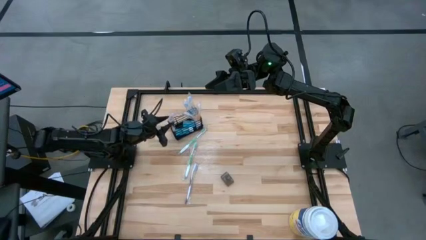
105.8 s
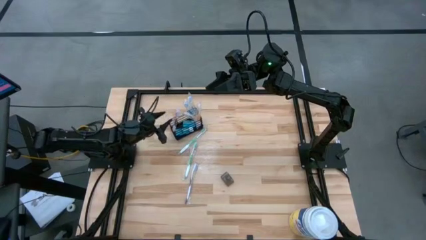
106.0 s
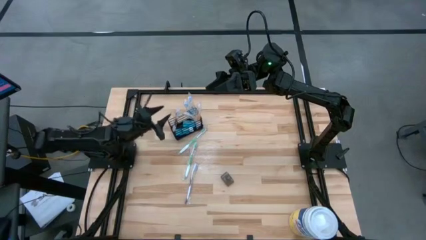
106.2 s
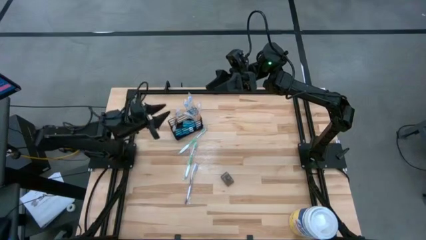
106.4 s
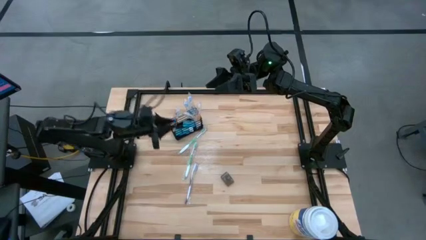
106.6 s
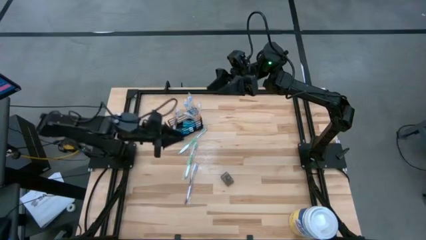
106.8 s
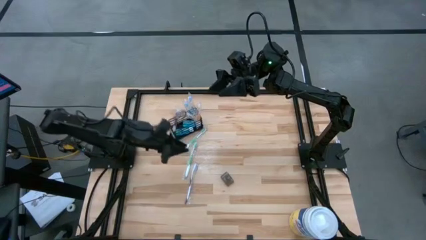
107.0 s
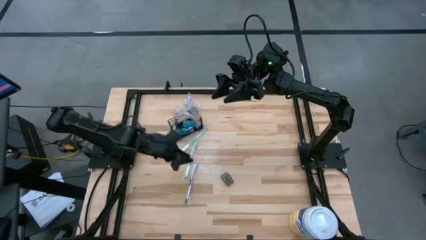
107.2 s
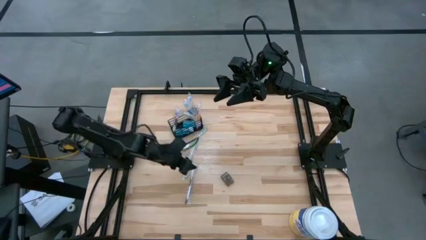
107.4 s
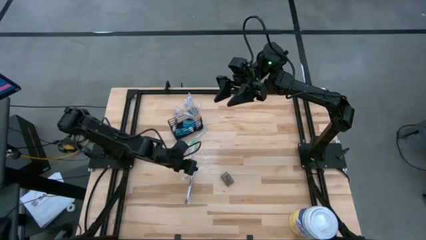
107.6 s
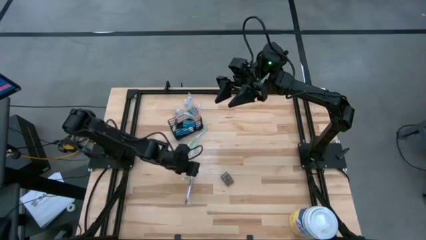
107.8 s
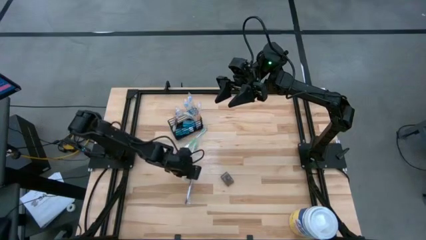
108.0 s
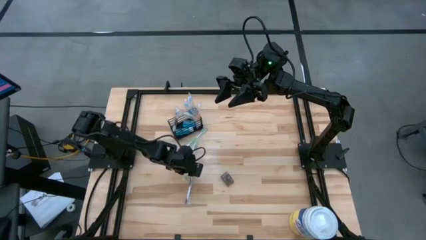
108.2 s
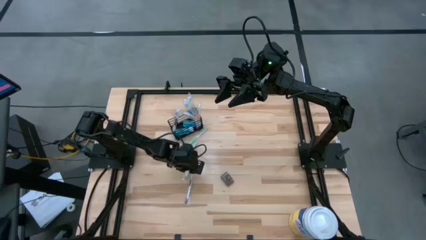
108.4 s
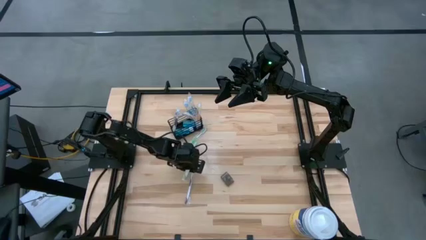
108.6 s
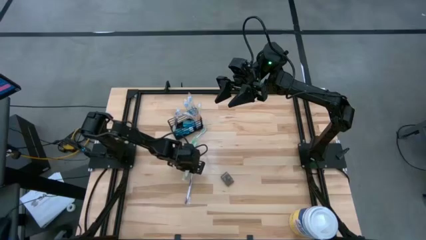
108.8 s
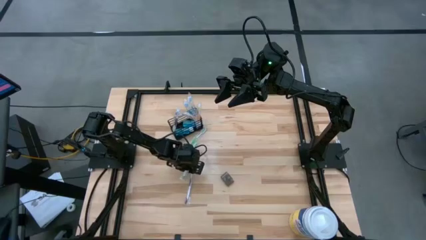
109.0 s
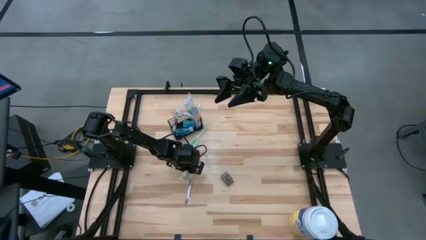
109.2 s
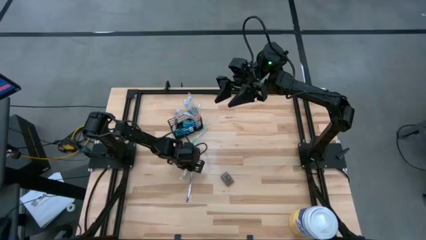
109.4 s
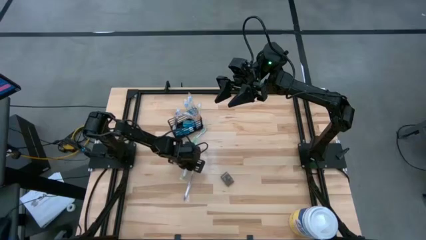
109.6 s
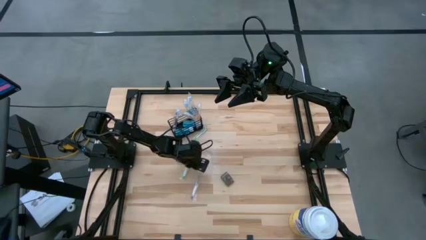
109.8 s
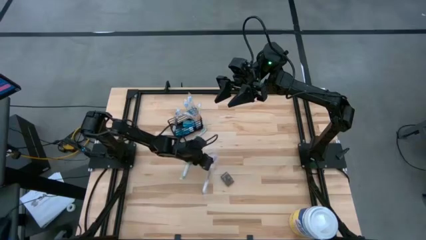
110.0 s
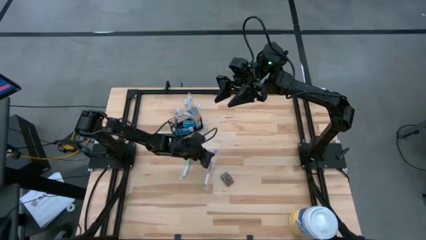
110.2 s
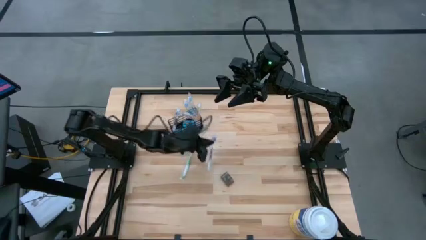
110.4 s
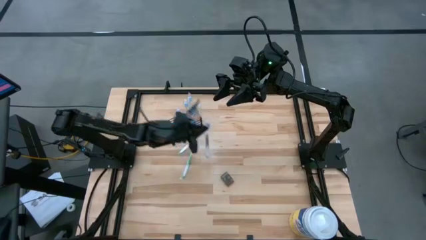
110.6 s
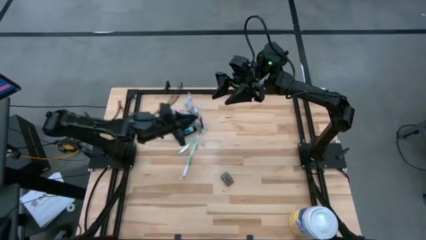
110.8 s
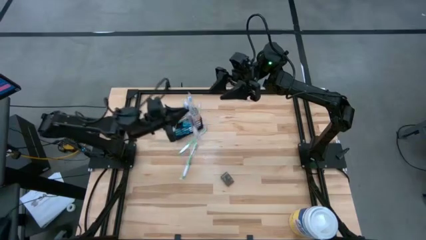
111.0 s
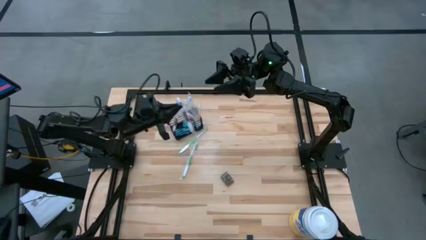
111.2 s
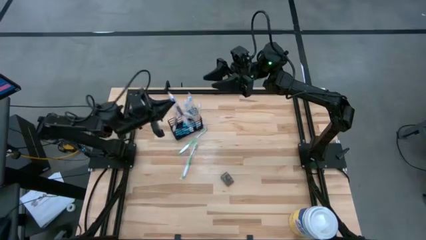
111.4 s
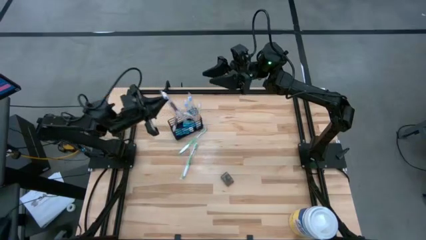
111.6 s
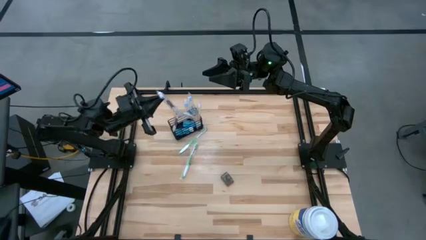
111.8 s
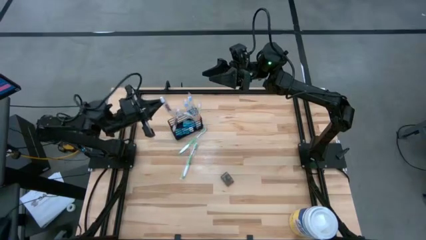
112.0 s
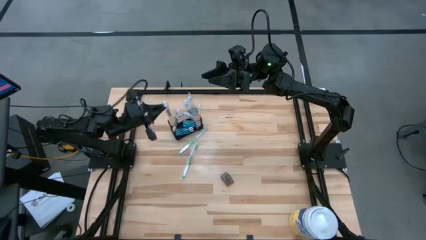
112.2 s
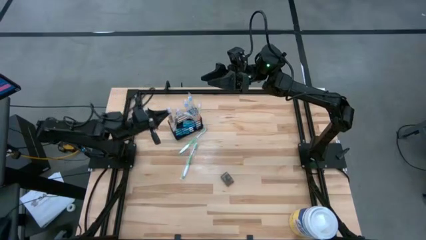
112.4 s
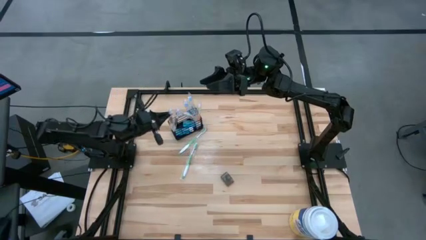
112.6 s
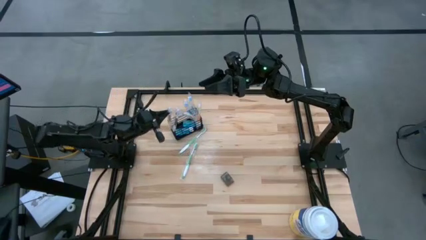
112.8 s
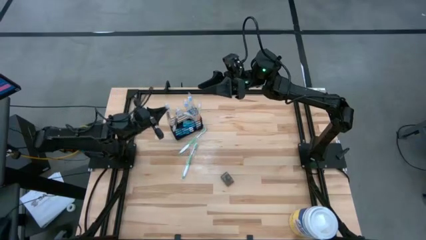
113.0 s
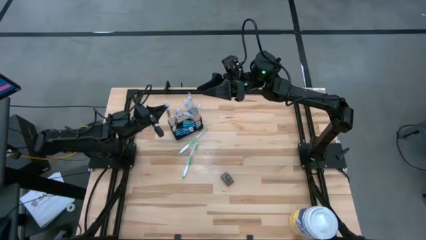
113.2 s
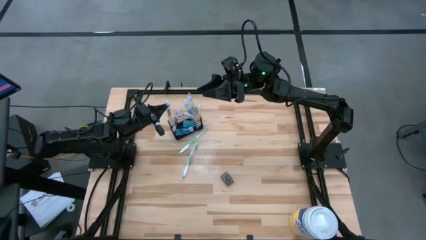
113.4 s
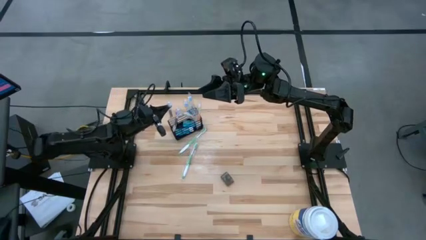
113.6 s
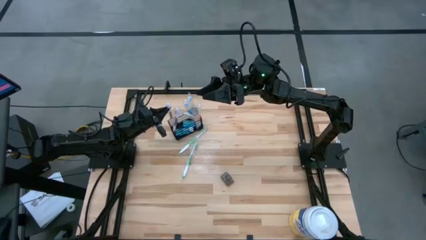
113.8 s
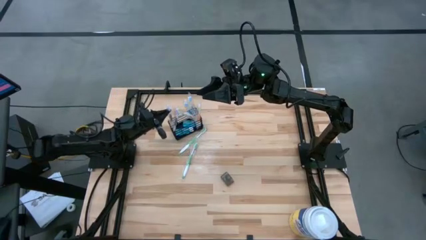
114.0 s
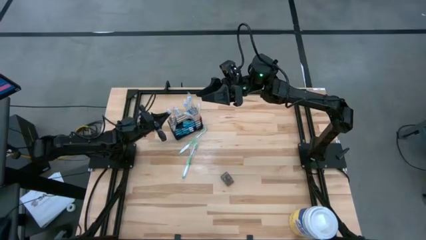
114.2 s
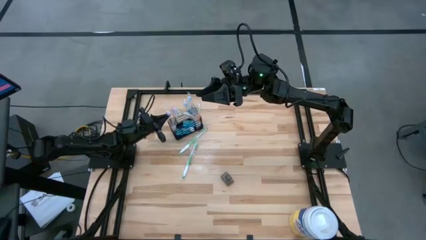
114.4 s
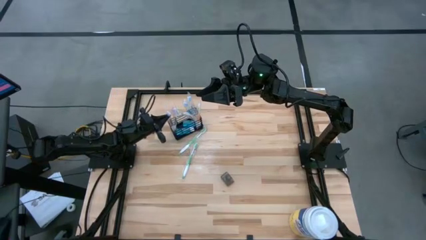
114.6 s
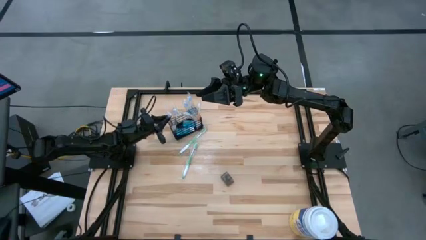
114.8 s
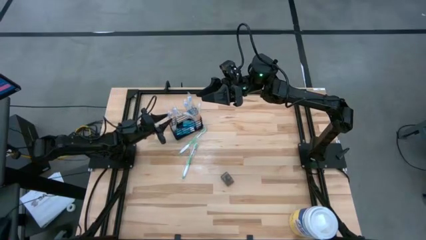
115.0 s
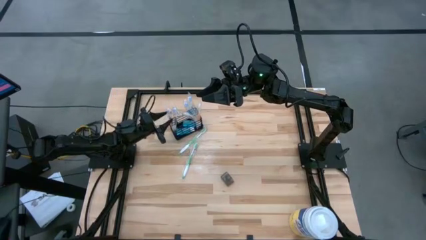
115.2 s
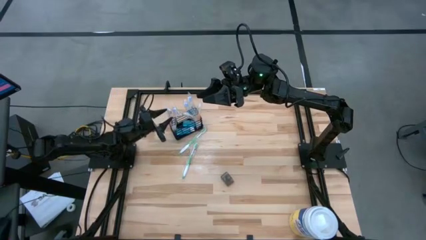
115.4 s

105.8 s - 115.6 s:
Task: Pick & Place toothbrushing station
Put the violet toothbrush into the black organizer

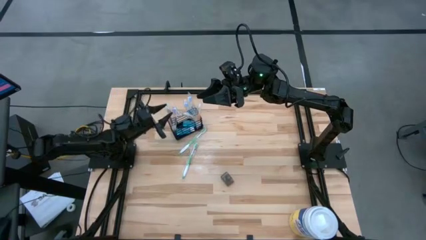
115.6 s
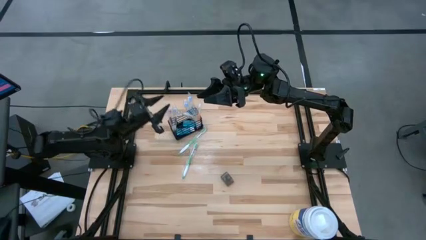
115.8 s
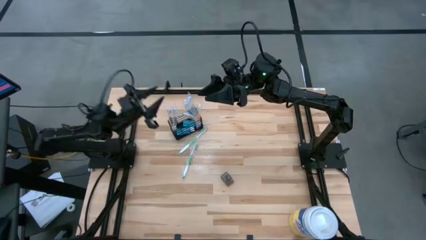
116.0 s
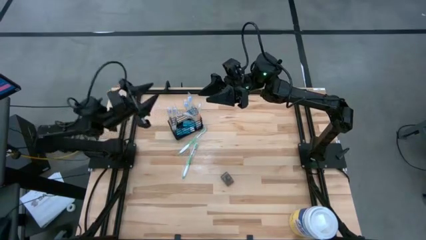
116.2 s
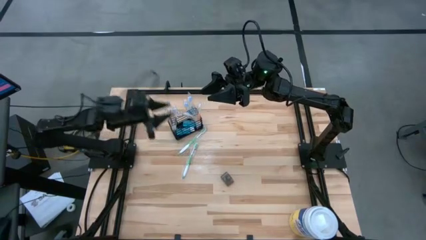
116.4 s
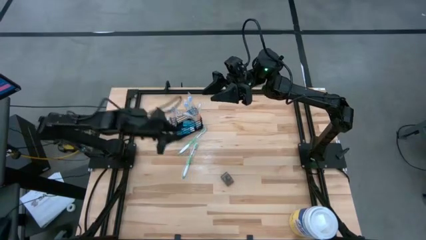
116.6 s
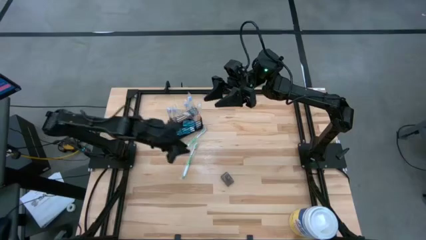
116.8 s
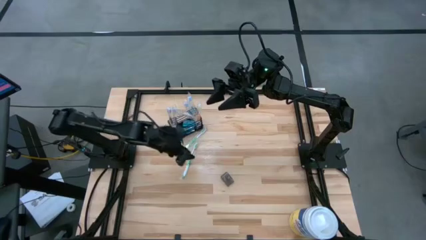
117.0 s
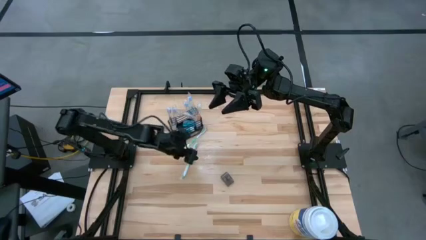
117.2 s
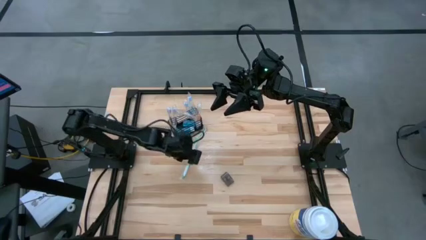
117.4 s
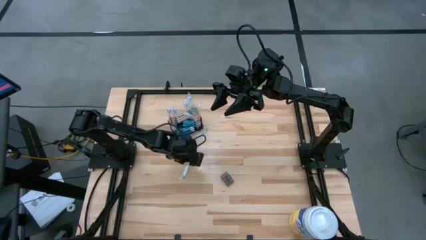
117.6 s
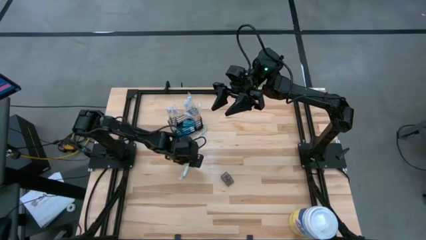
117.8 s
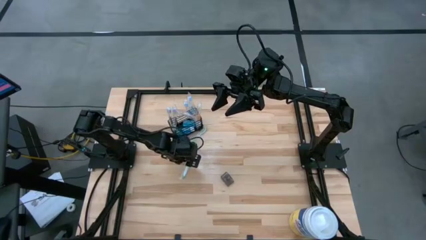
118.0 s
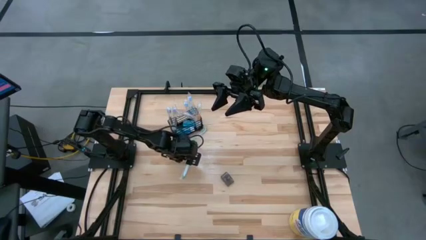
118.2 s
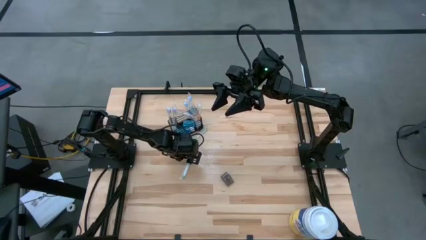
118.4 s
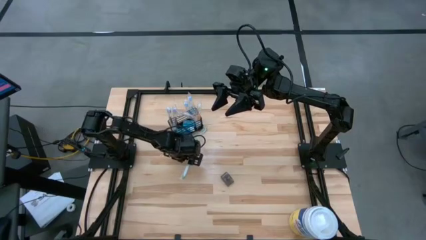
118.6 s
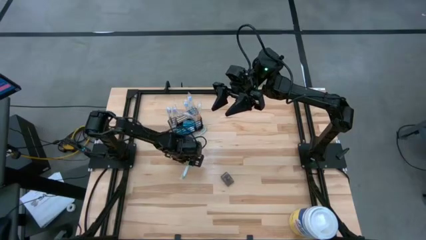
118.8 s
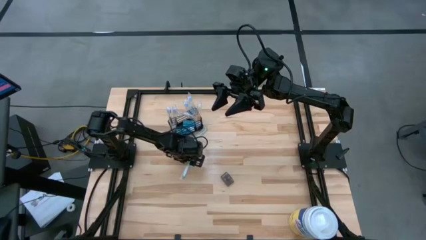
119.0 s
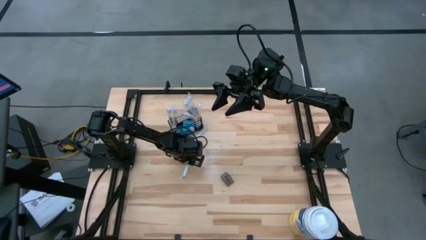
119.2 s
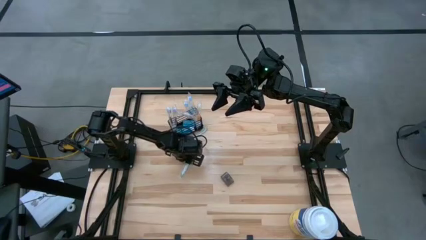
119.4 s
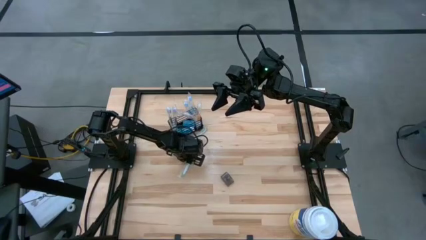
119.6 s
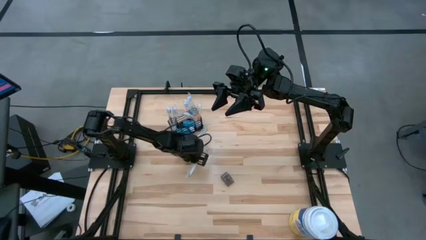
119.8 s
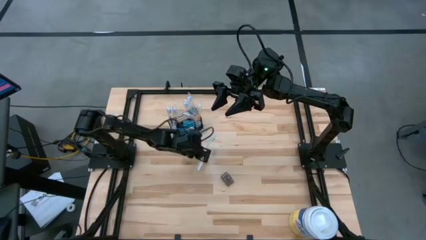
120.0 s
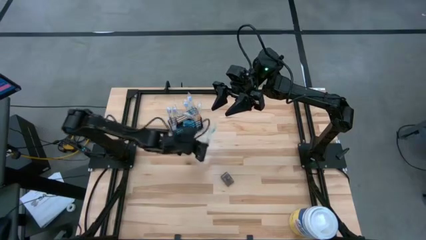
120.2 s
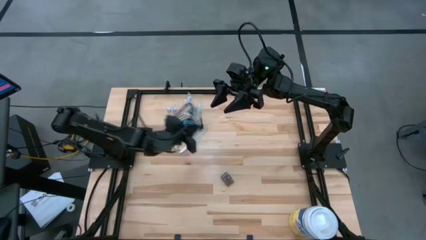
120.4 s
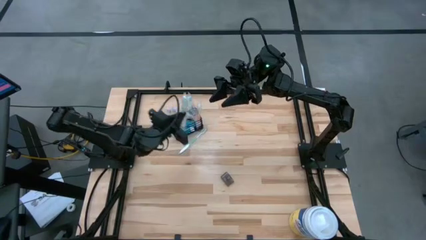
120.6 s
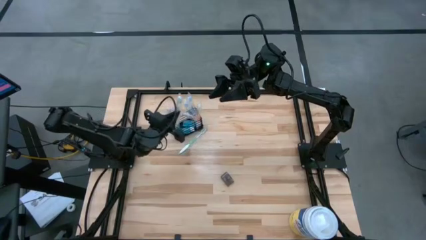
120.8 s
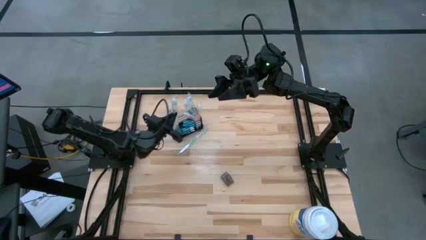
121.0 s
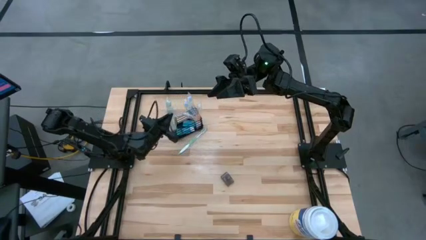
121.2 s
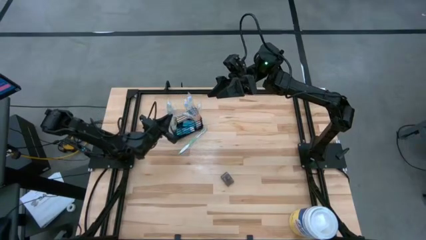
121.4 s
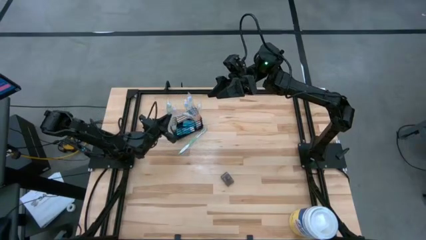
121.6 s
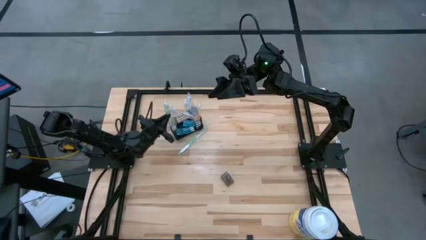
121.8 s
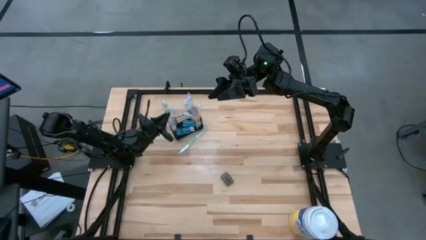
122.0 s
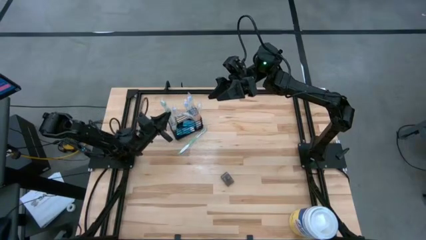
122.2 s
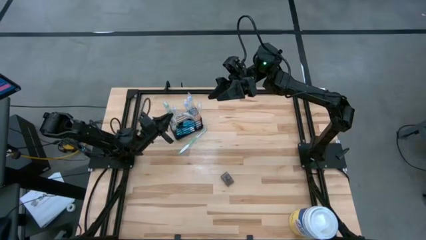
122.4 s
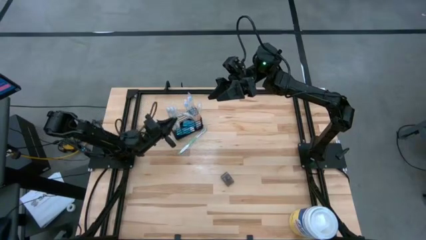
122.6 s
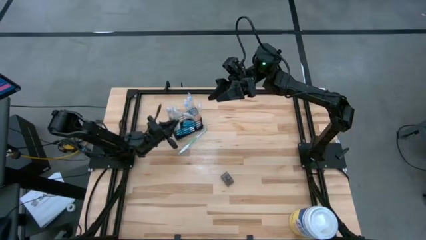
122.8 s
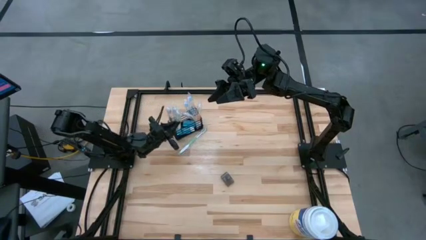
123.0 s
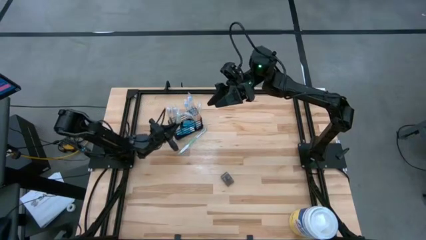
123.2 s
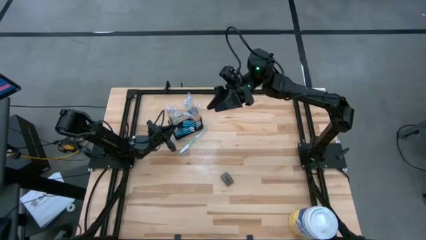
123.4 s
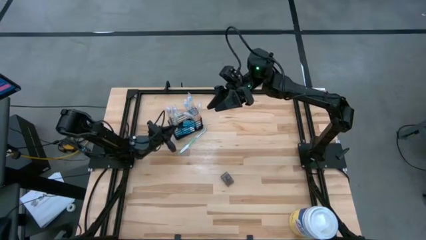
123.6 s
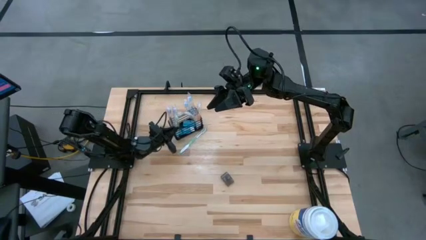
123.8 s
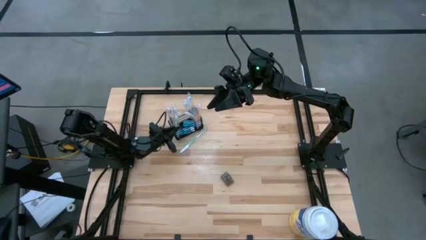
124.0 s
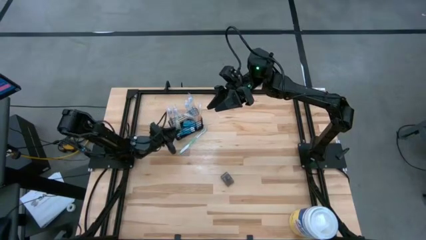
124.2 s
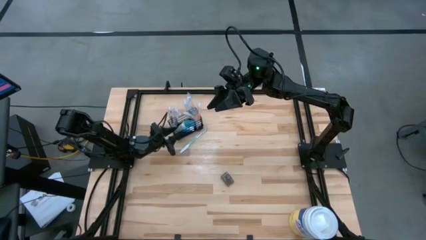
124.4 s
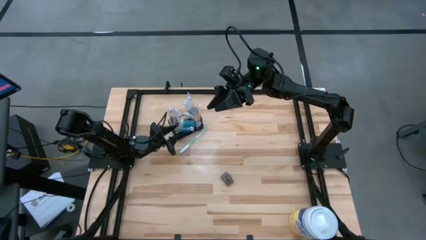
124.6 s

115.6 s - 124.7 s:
Put the green toothbrush into the black organizer
